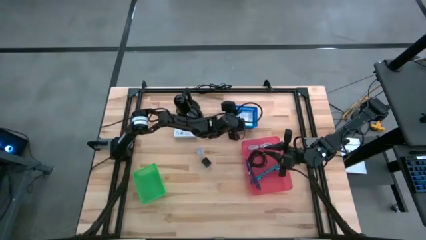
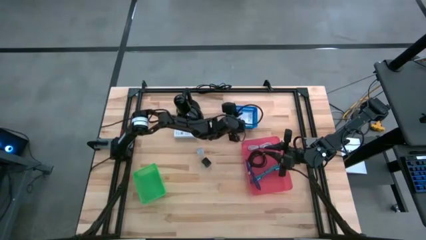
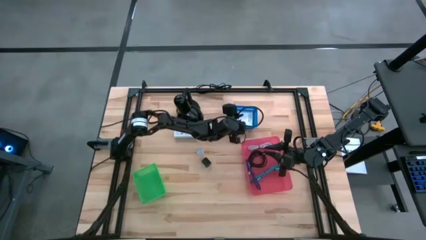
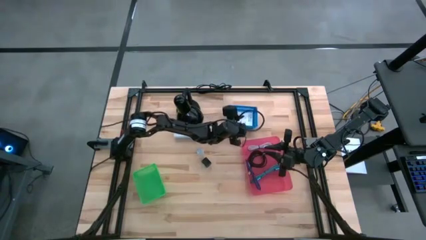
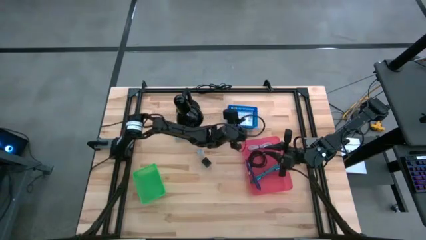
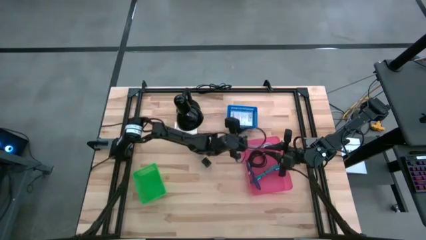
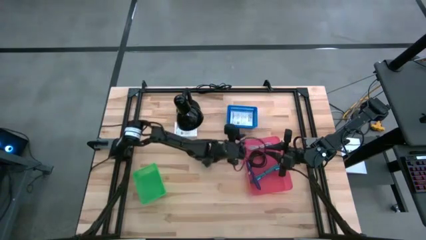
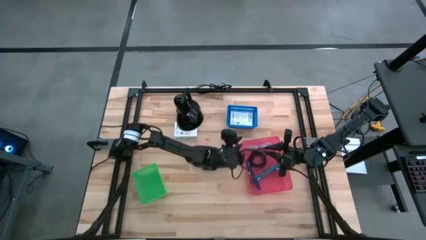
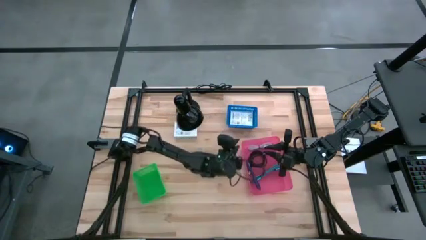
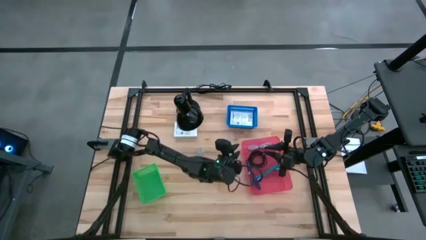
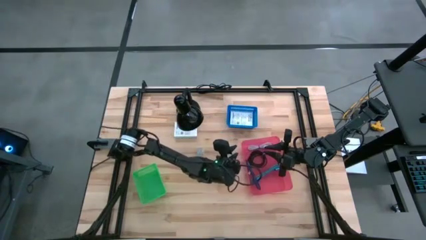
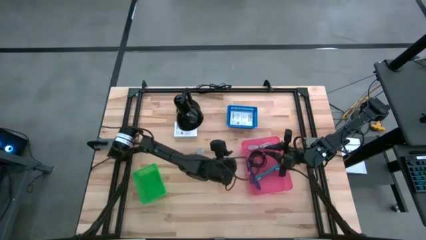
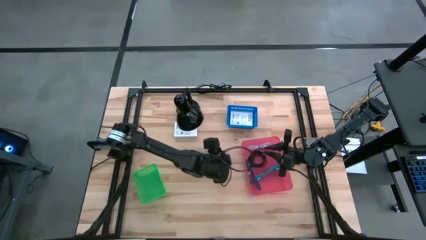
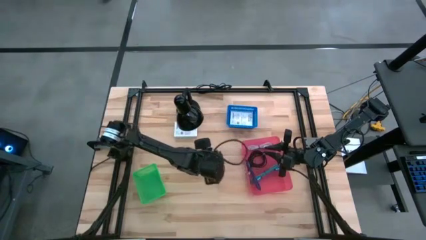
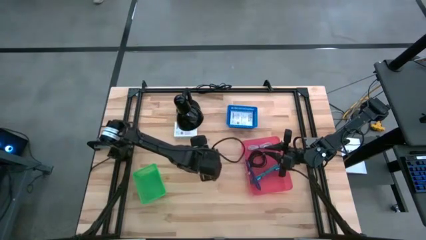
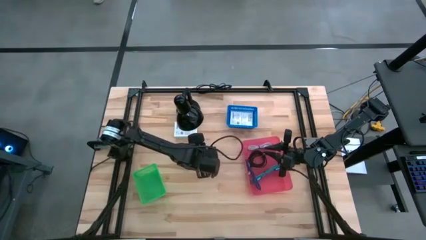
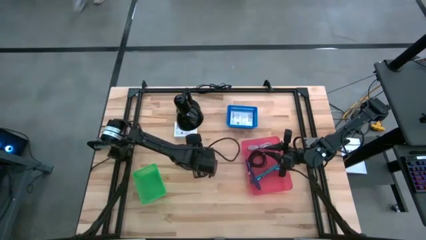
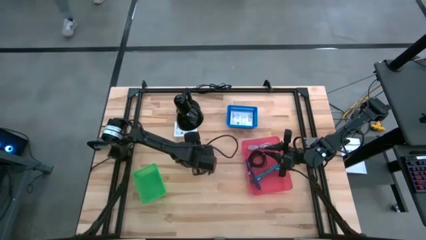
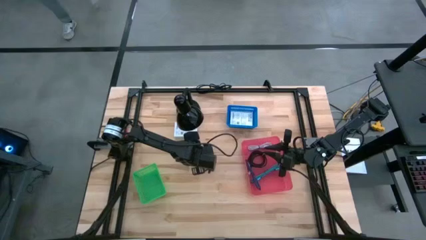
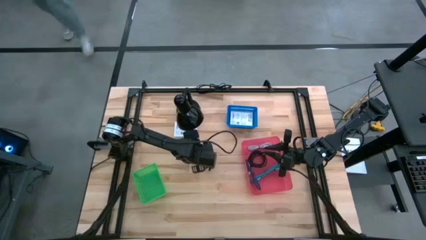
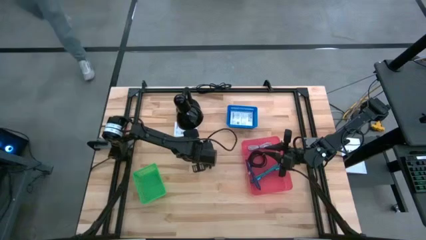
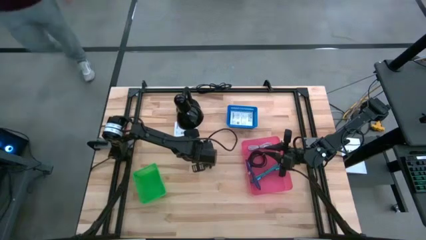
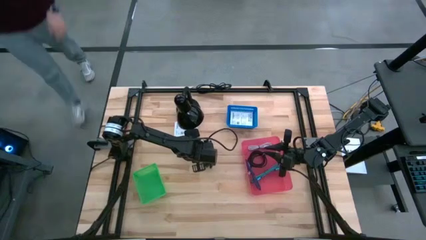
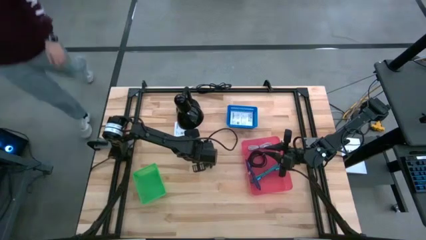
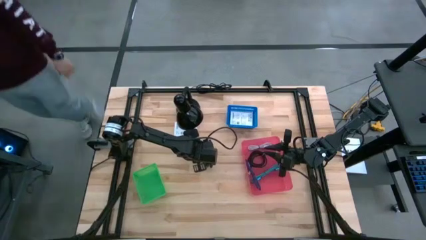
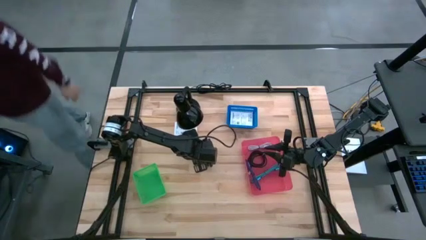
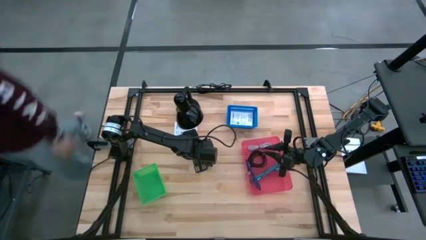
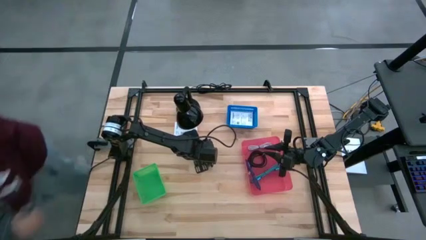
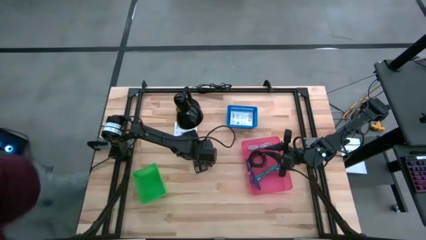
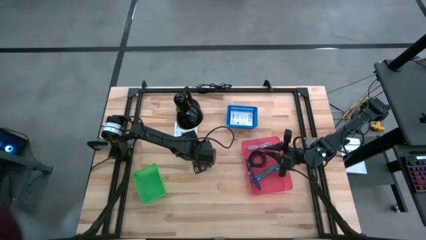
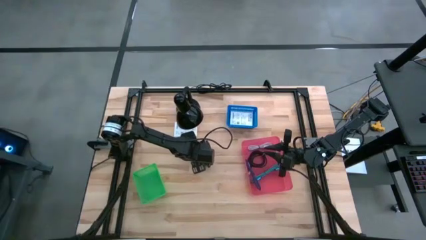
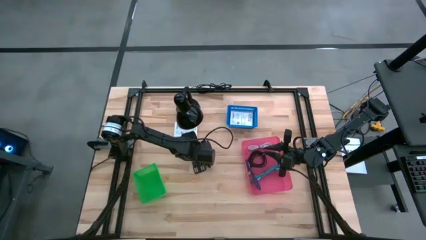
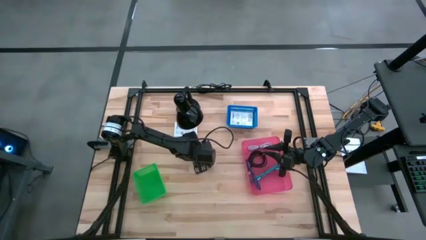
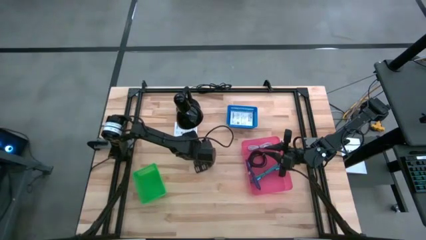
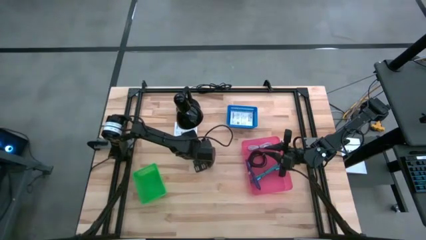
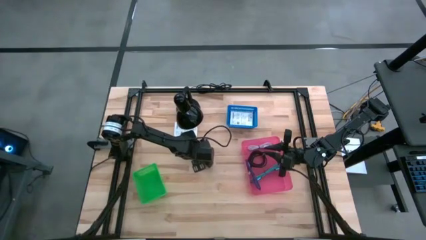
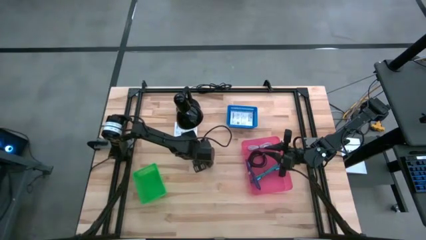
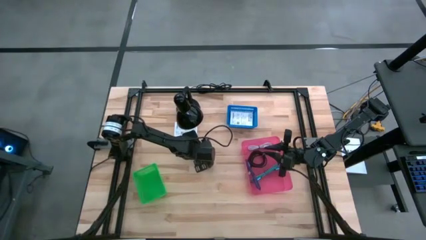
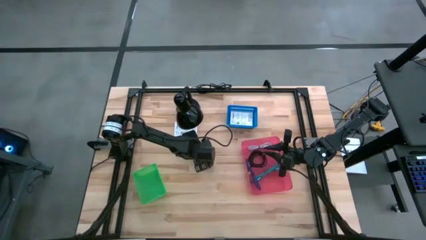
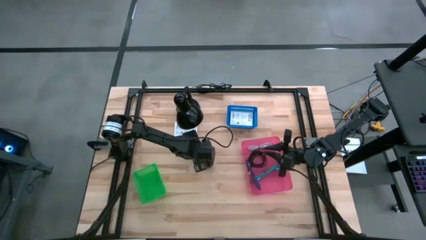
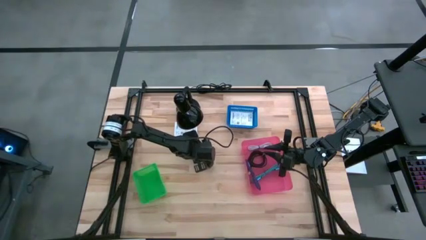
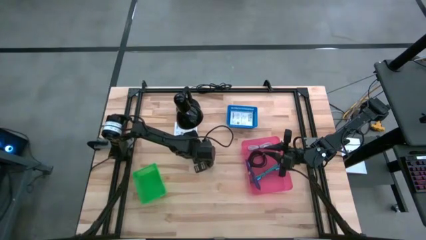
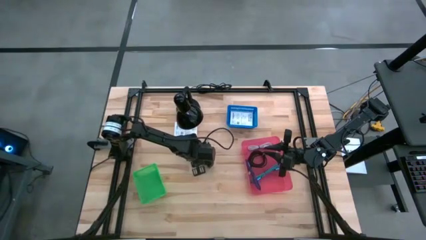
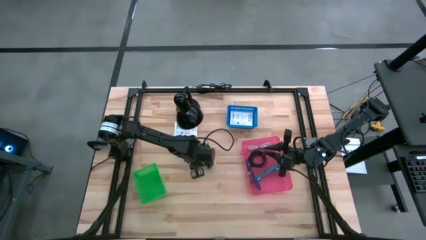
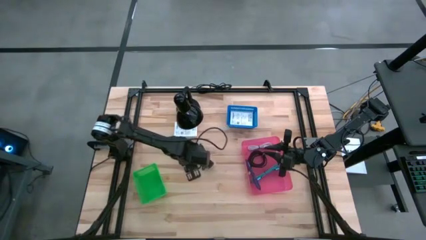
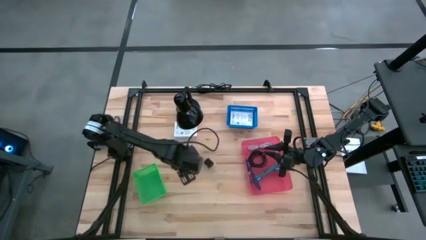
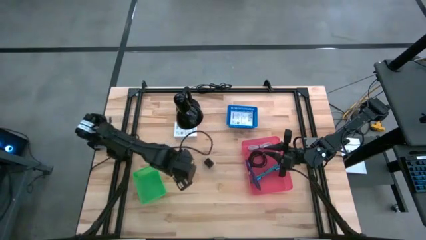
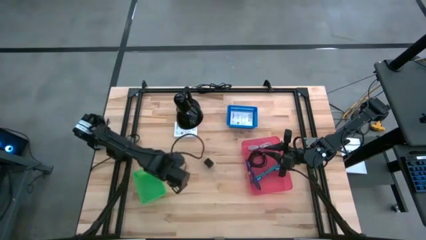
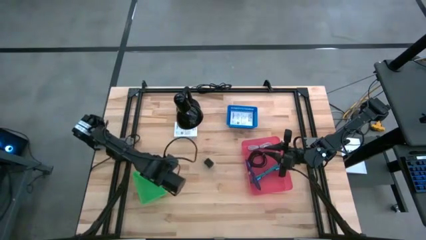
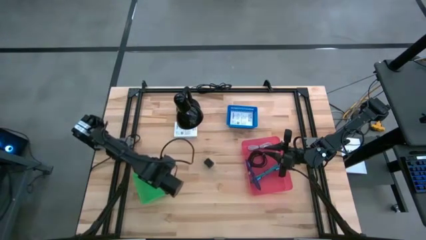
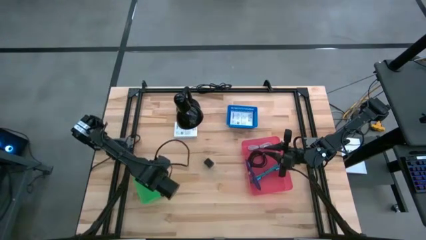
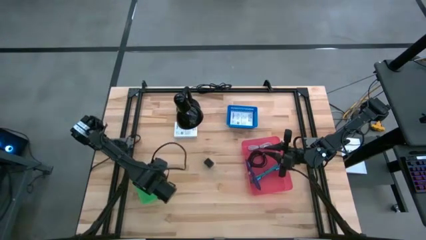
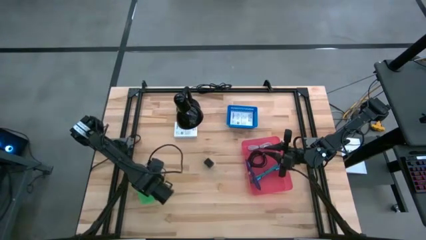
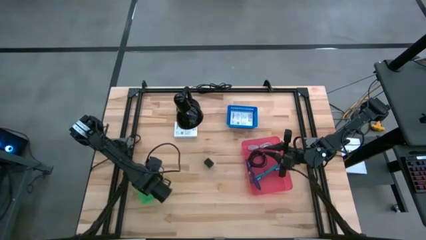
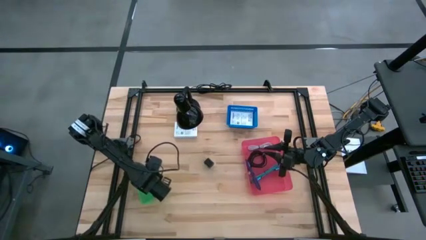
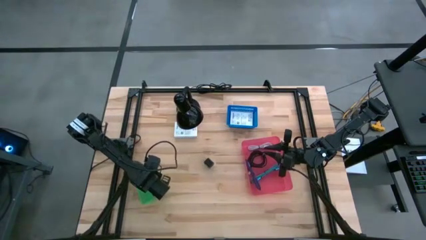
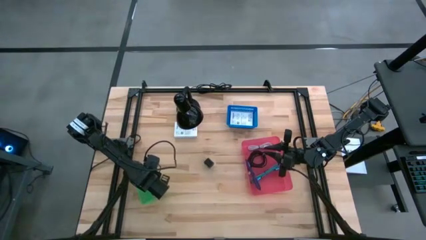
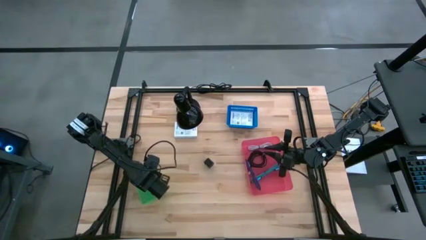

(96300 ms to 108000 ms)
Task: Pick and place items into bin
Put the white charger adapter into the green bin

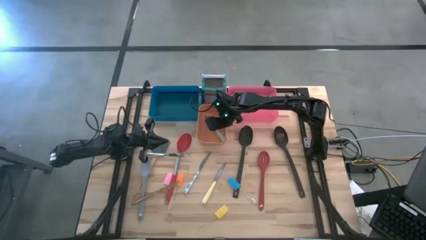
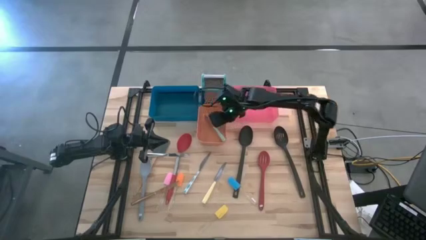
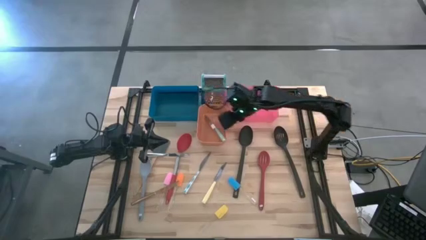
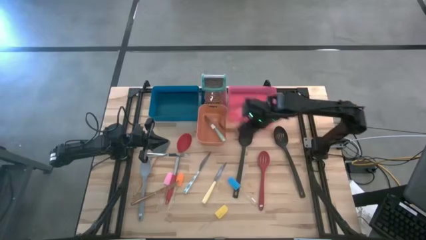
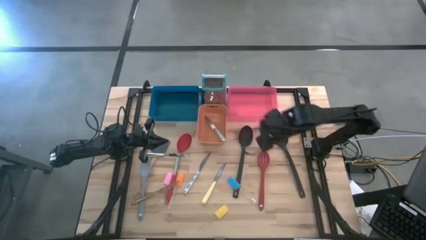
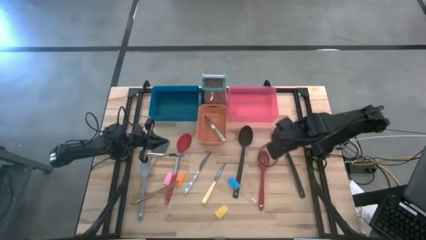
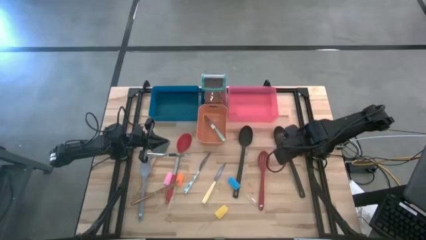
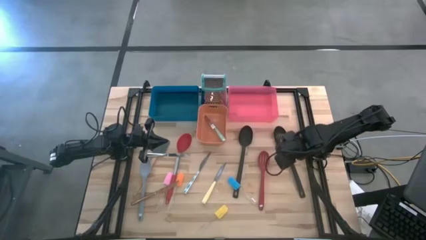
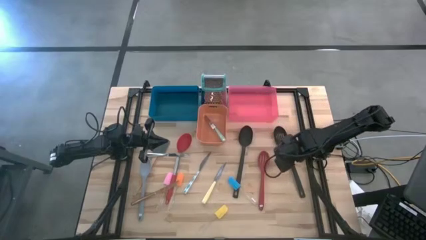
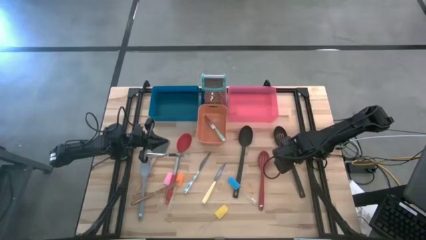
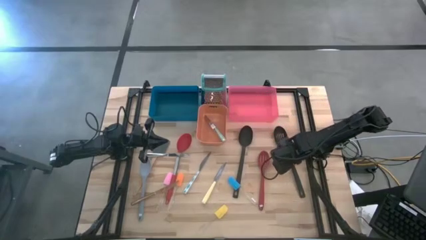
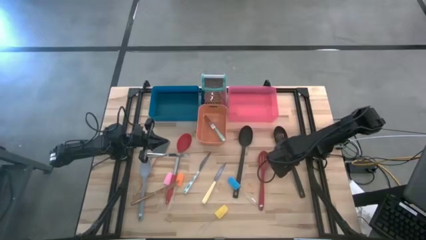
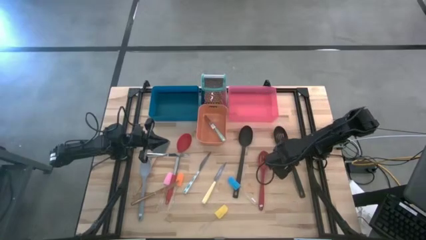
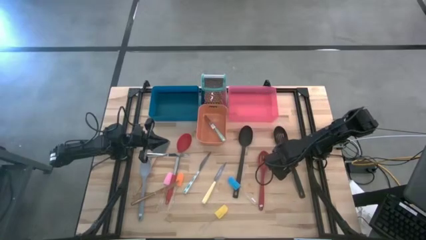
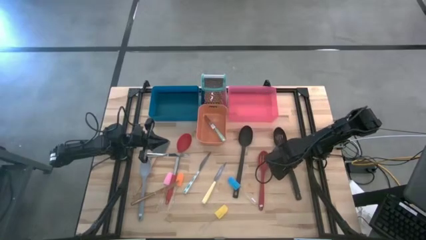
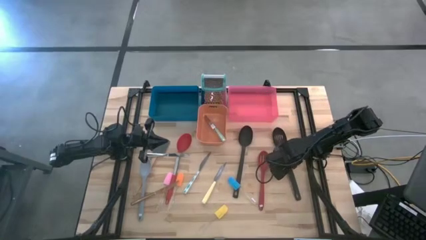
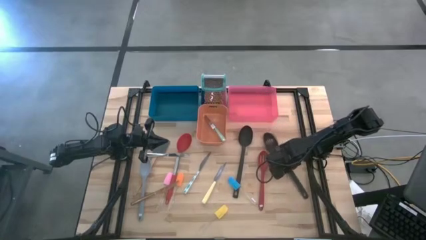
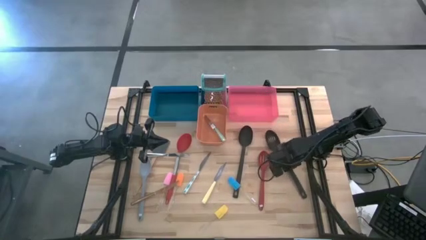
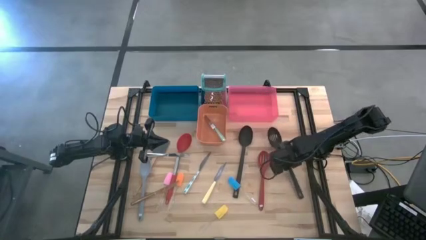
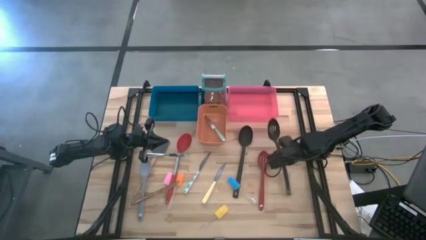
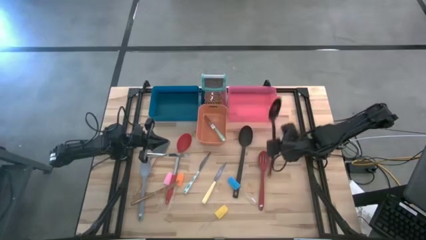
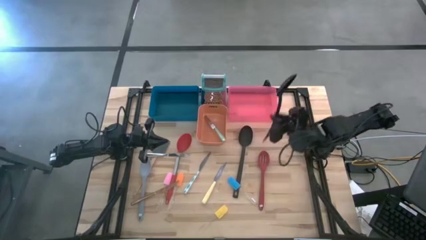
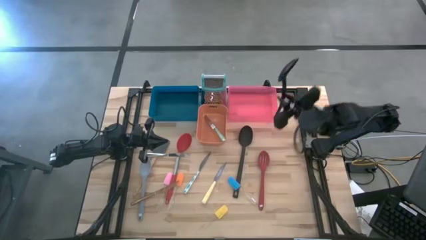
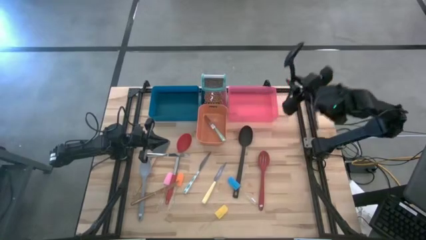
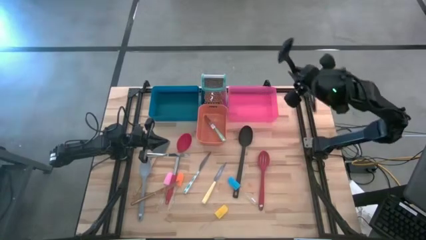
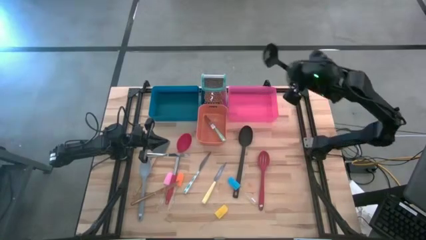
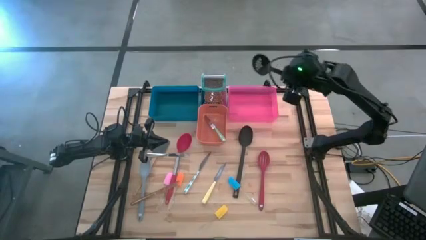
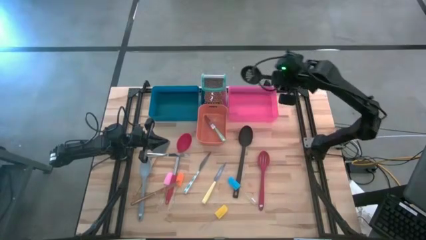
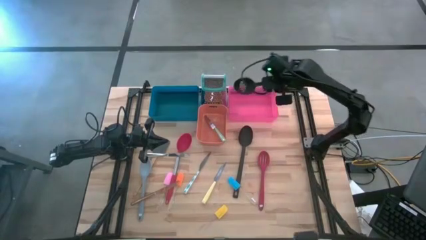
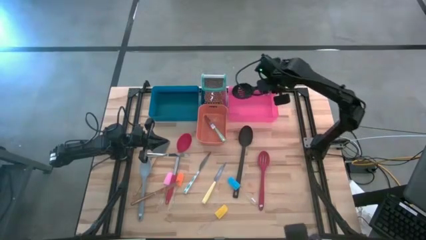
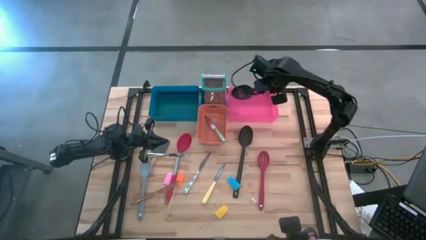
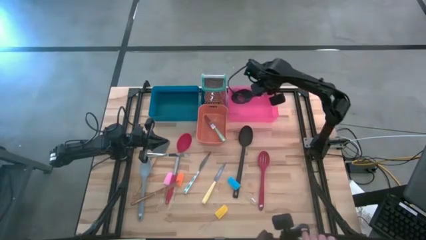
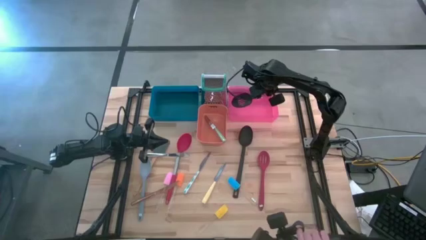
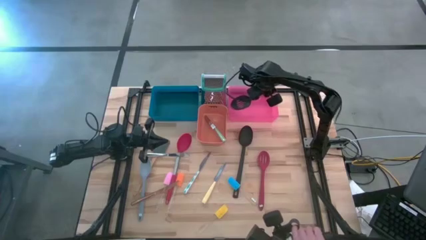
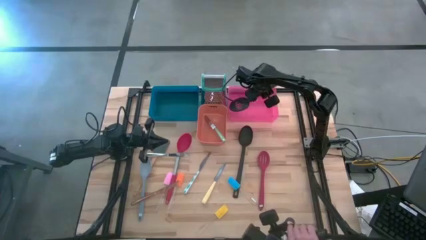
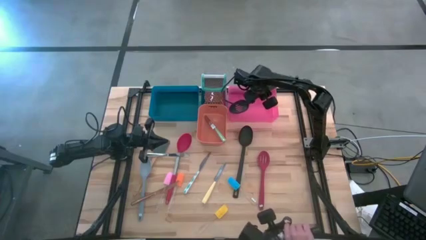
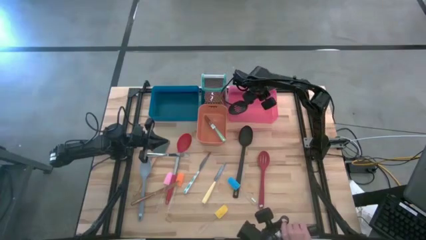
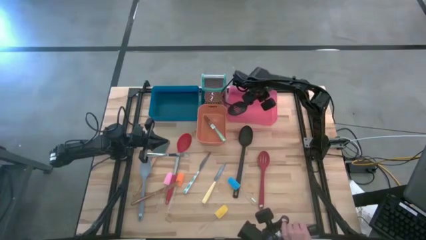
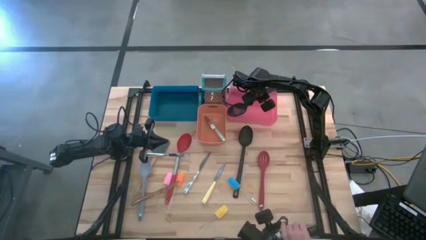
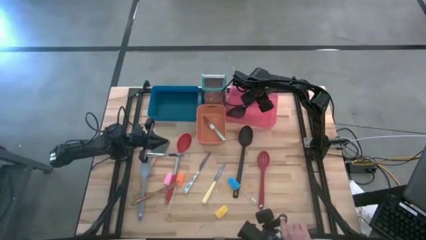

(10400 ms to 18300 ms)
Task: Pick & Place Kitchen Items
Put the black slotted serving spoon into the pink bin
